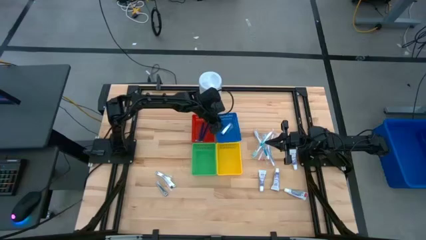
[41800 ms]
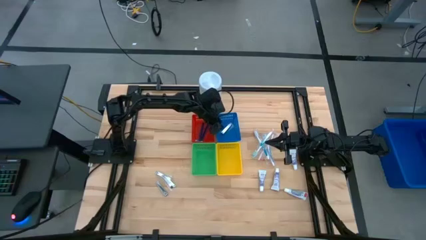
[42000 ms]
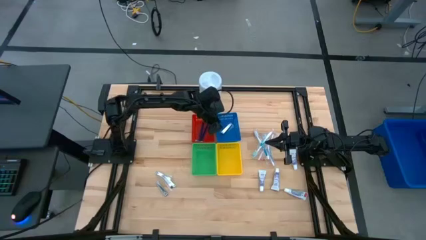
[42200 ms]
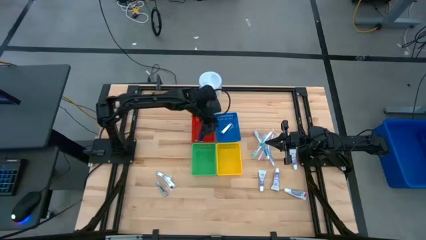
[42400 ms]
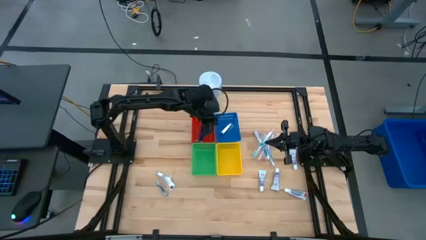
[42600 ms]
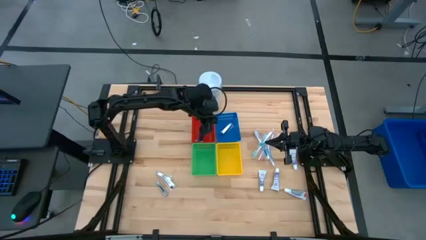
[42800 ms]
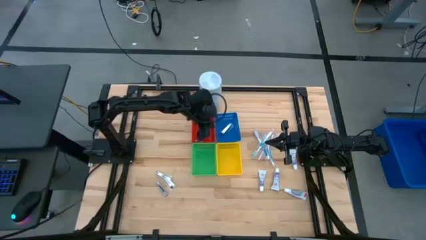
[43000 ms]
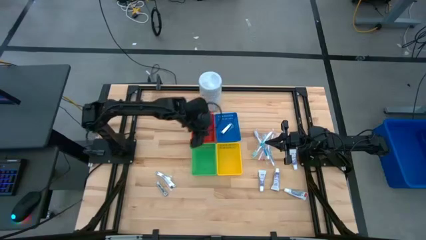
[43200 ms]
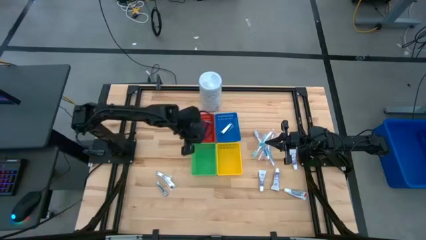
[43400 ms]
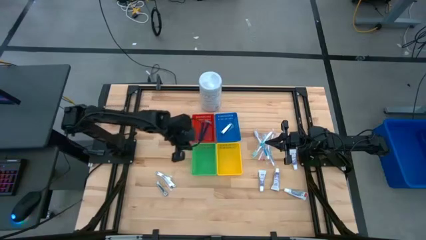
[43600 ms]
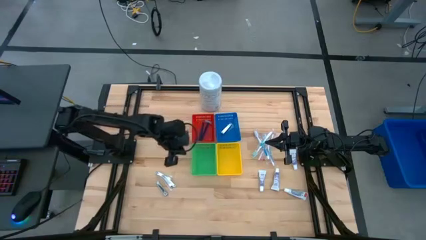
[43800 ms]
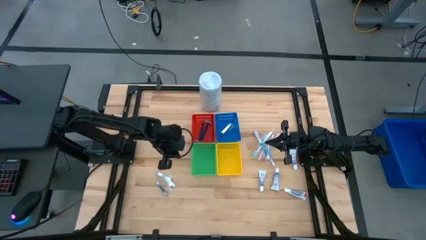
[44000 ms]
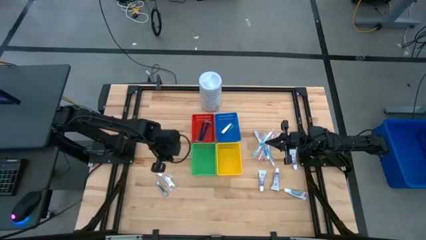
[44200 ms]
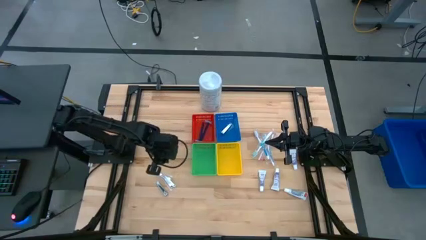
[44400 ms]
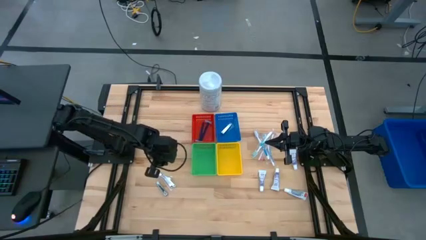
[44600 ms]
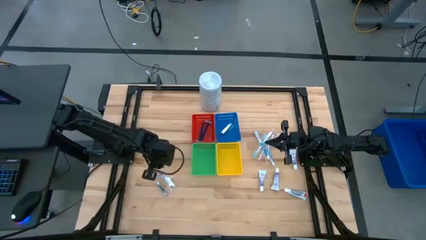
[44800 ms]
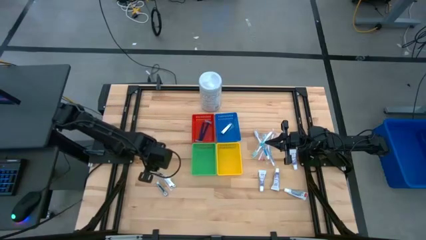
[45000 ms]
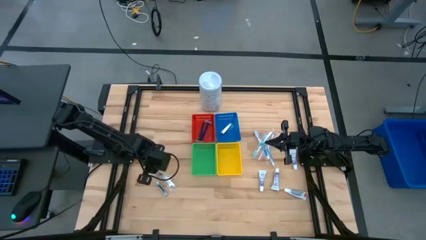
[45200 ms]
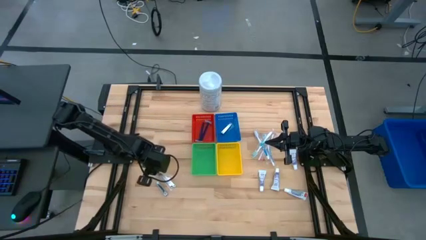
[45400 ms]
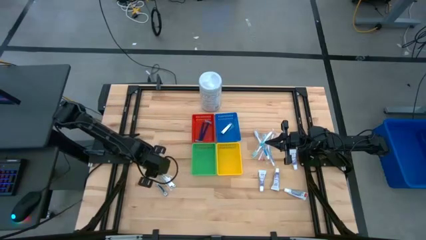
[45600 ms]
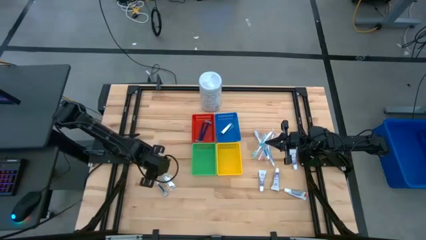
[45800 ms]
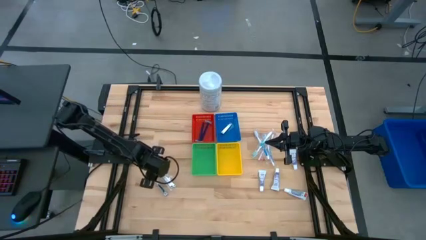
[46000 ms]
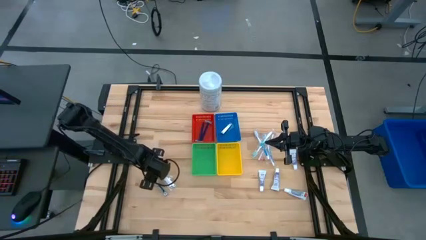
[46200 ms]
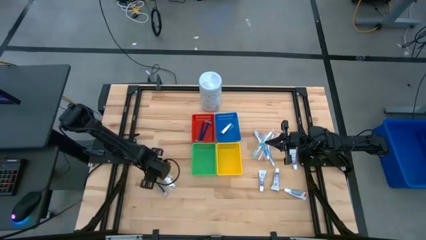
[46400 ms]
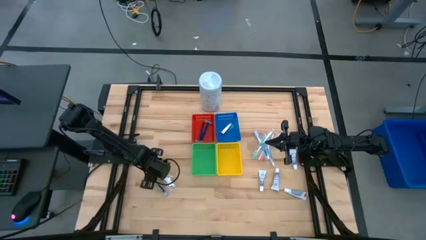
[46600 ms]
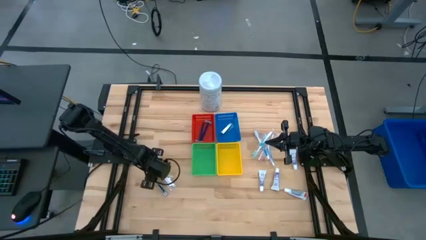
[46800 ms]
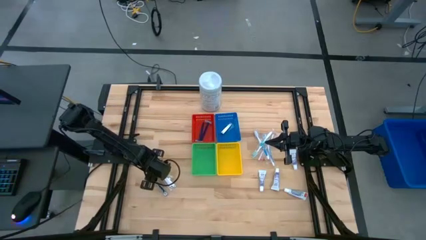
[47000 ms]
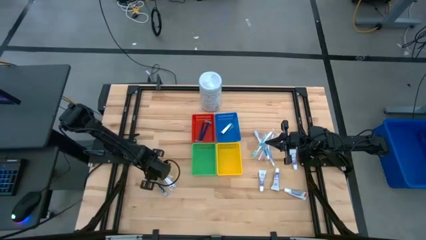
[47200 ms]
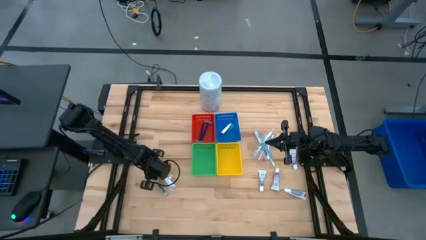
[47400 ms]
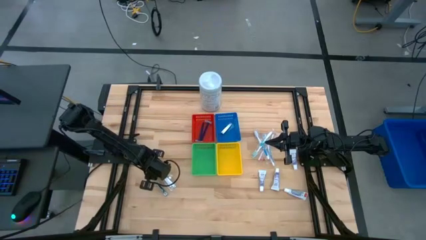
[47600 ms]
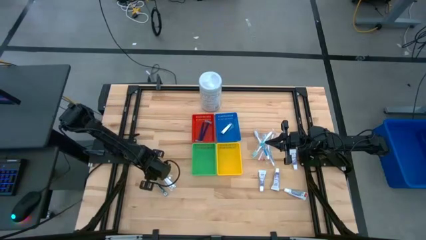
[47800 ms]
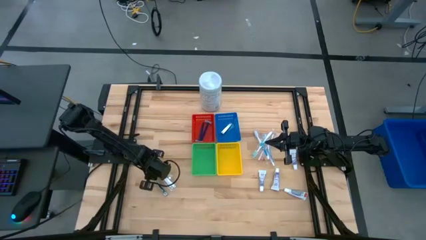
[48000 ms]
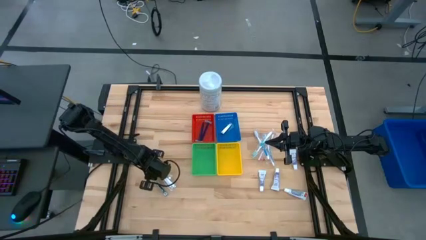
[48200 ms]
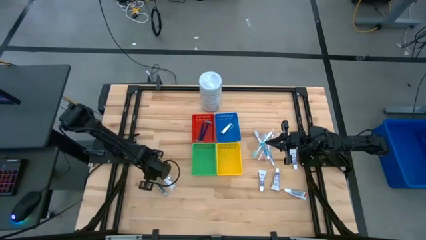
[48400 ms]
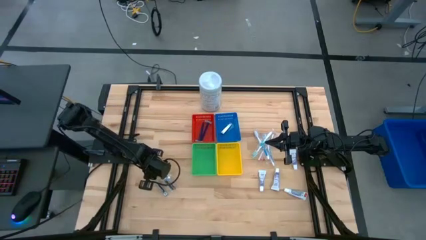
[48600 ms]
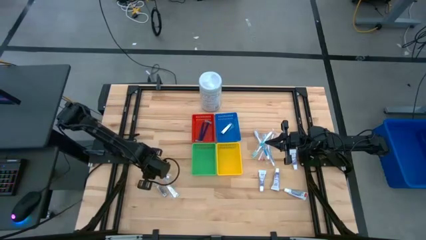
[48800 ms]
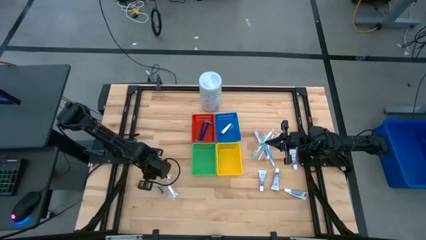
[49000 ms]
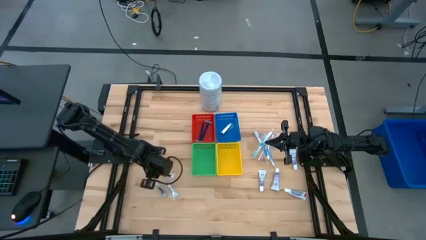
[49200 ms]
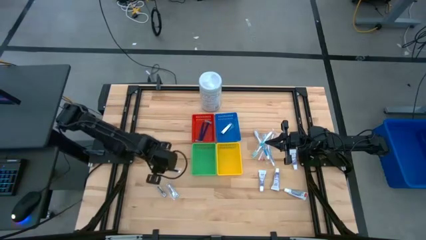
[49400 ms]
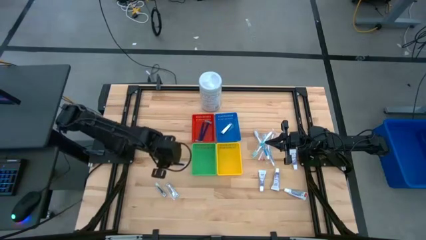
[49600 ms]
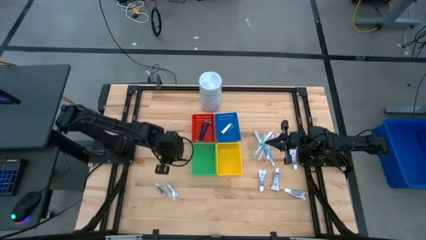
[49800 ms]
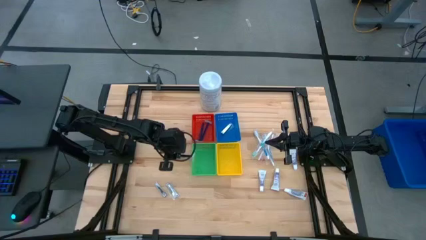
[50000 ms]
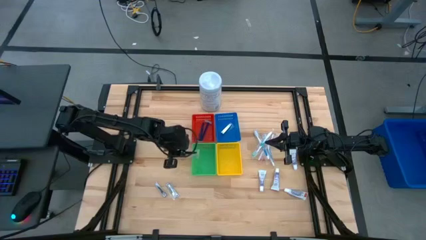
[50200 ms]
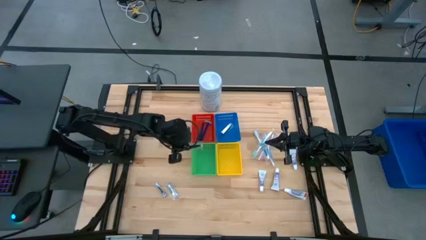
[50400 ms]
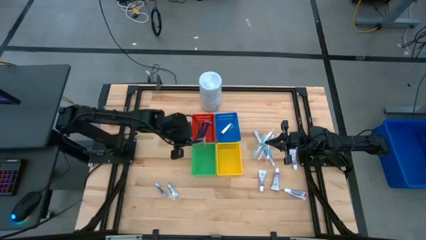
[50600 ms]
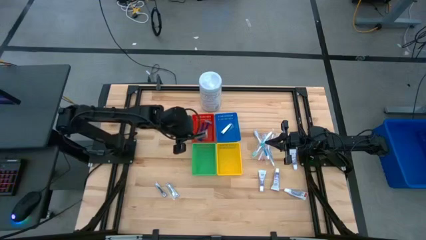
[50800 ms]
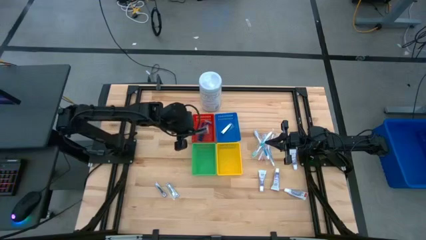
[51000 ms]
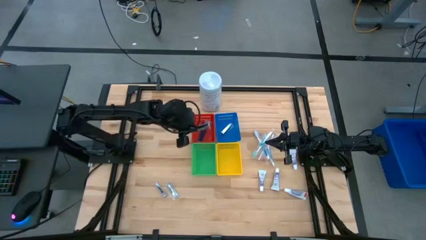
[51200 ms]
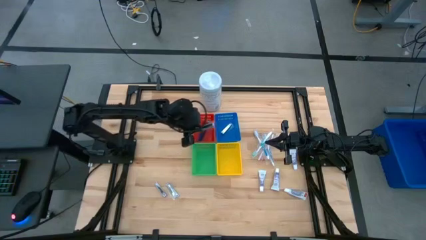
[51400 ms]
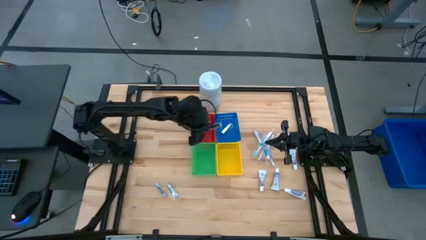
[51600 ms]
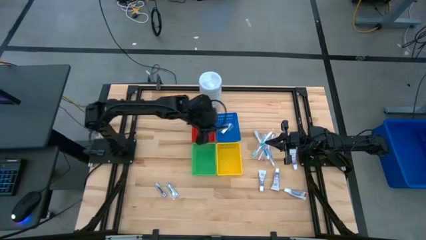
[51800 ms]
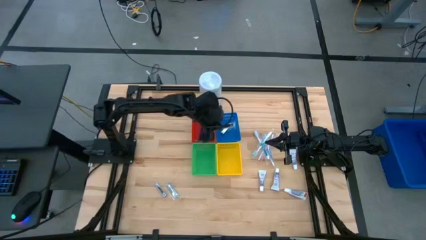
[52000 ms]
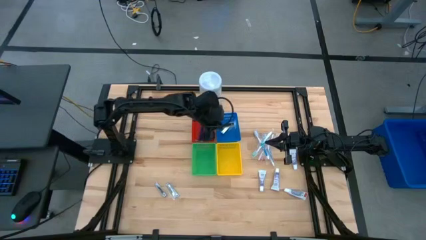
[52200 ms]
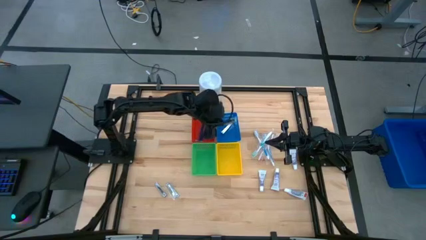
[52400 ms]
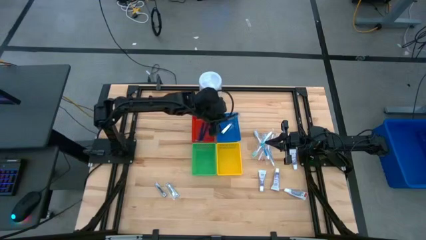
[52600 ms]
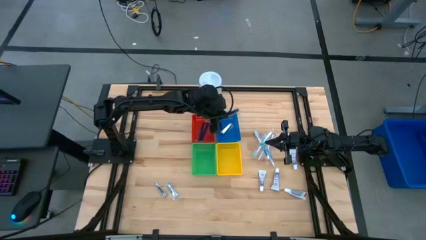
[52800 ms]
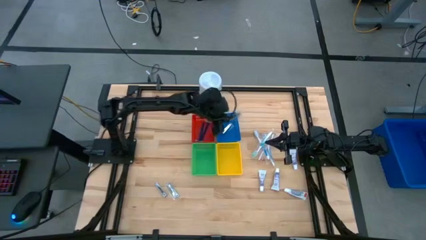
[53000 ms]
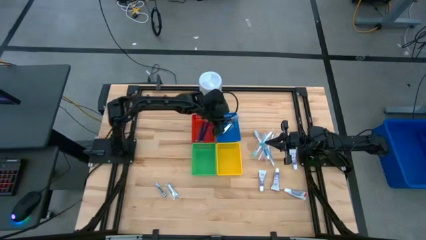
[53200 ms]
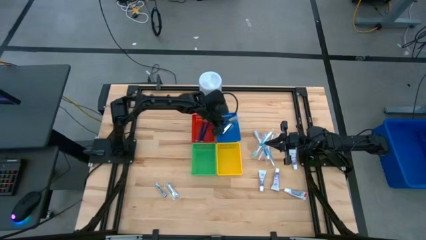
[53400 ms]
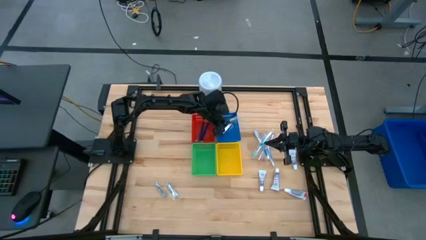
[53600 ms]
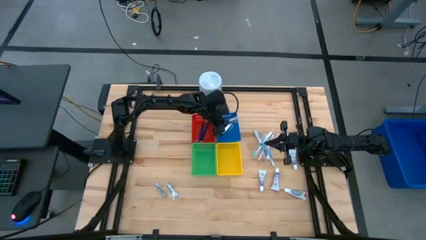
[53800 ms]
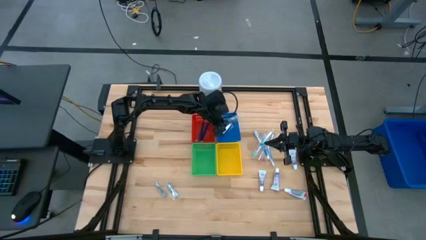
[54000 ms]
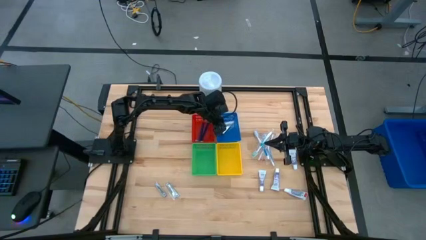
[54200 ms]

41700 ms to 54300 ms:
Task: Pick & Place Travel size toiletries
Put the silver nail cutter into the blue bin
